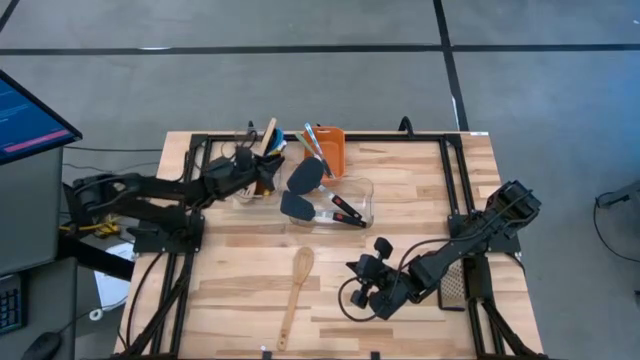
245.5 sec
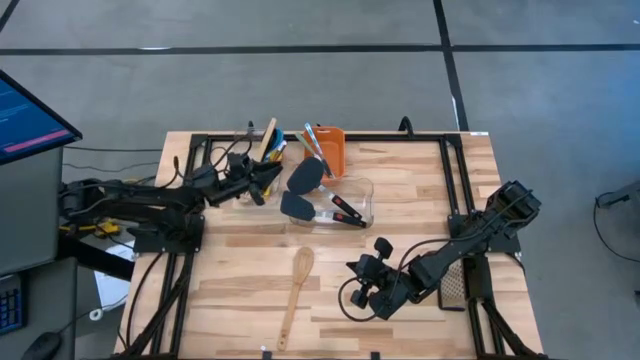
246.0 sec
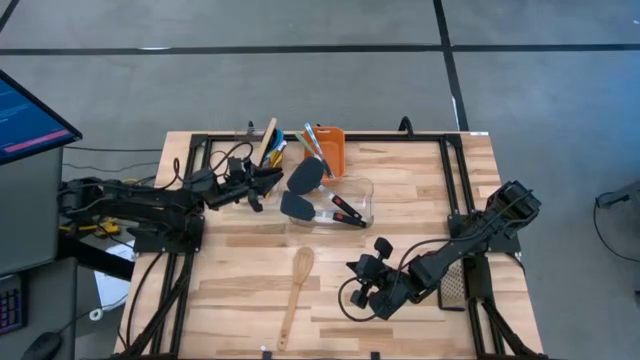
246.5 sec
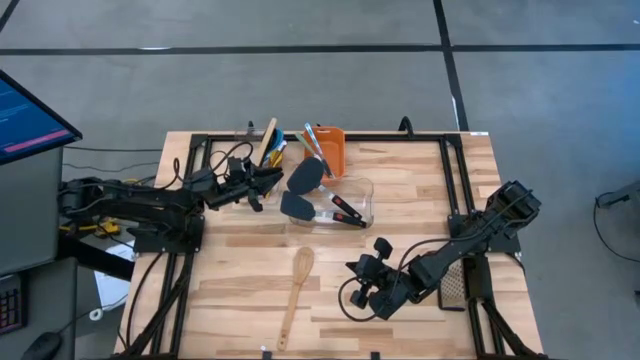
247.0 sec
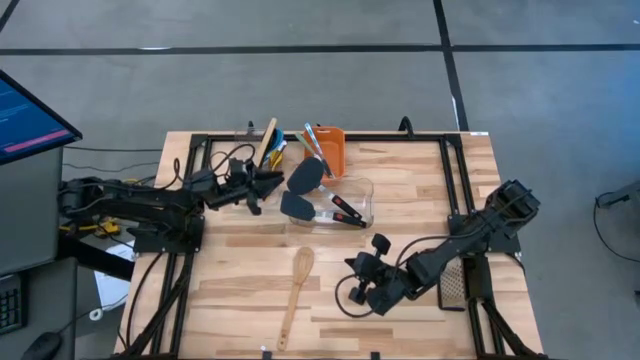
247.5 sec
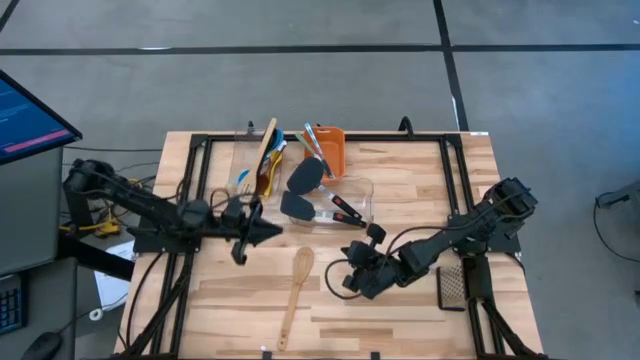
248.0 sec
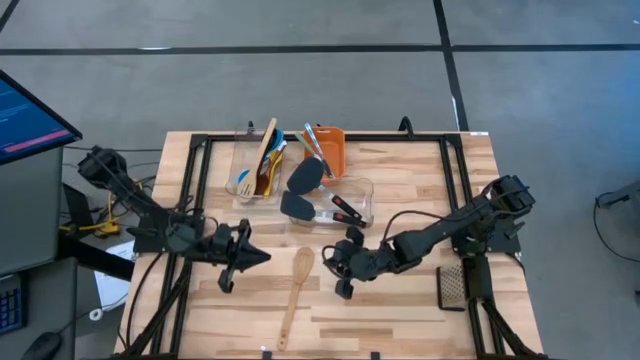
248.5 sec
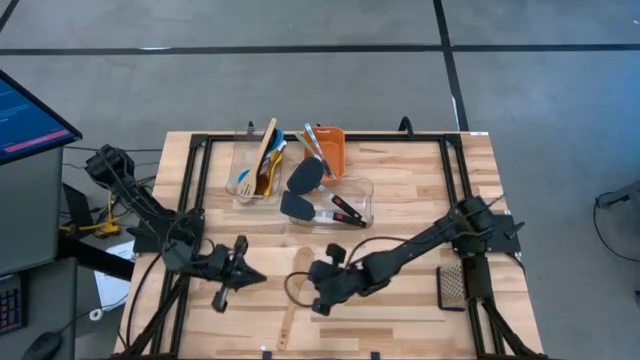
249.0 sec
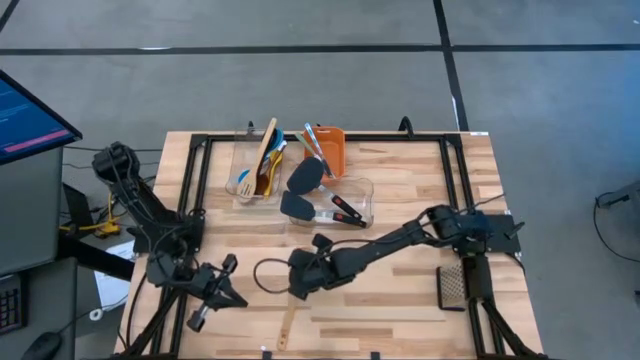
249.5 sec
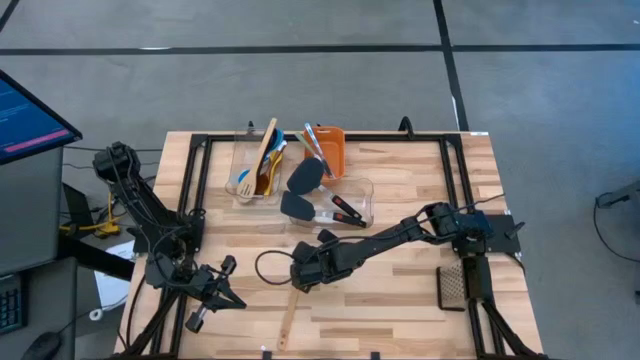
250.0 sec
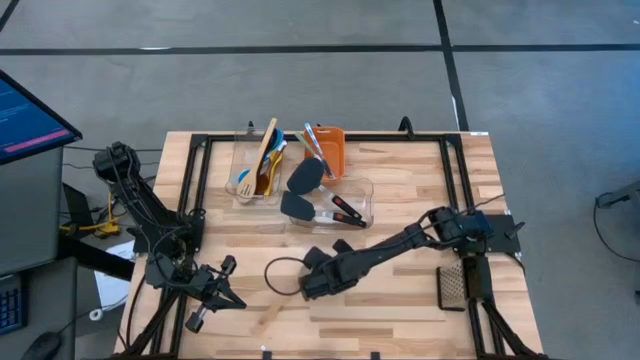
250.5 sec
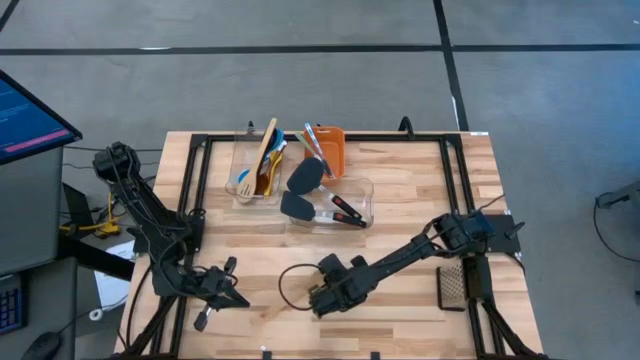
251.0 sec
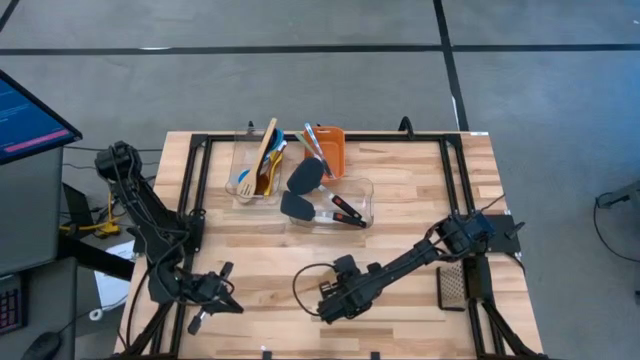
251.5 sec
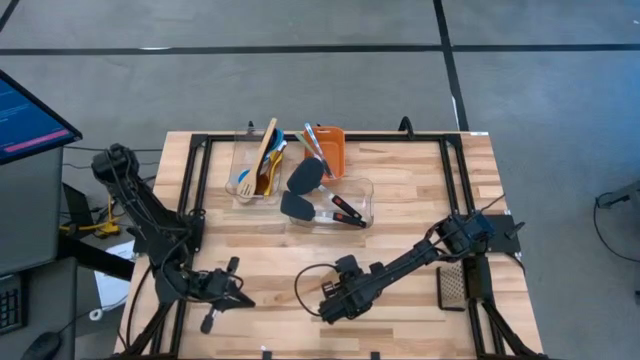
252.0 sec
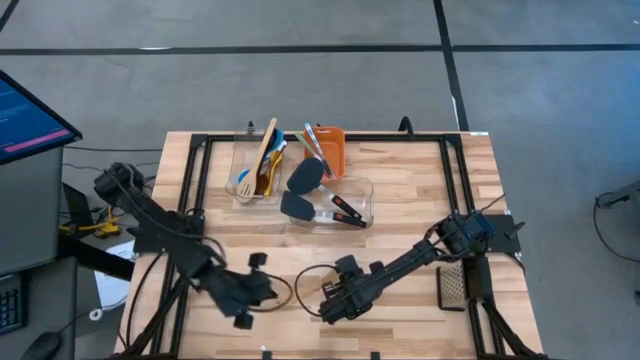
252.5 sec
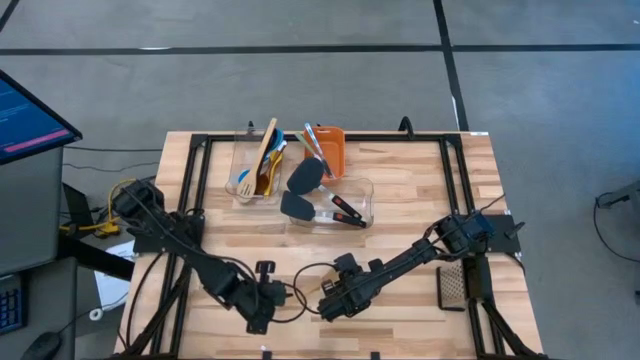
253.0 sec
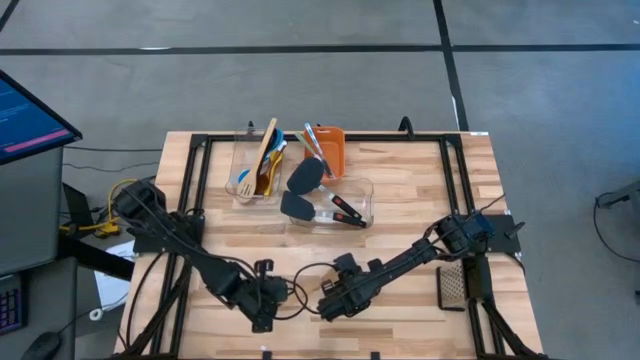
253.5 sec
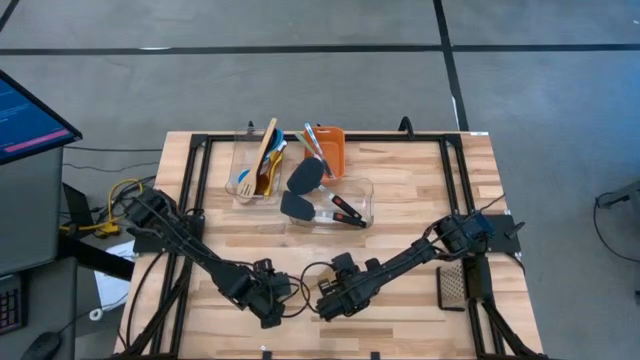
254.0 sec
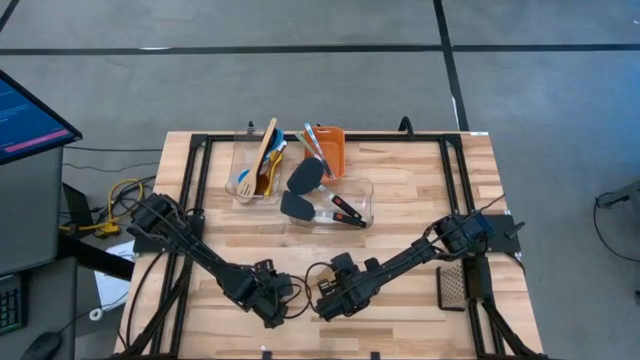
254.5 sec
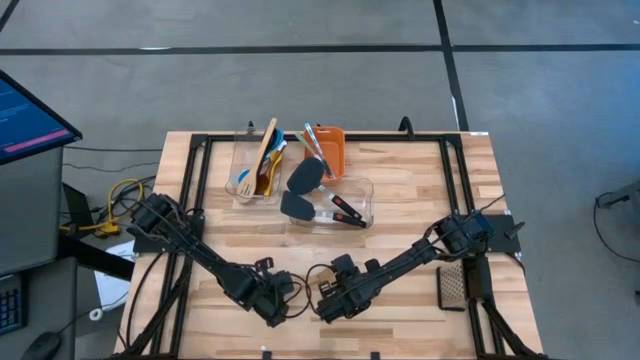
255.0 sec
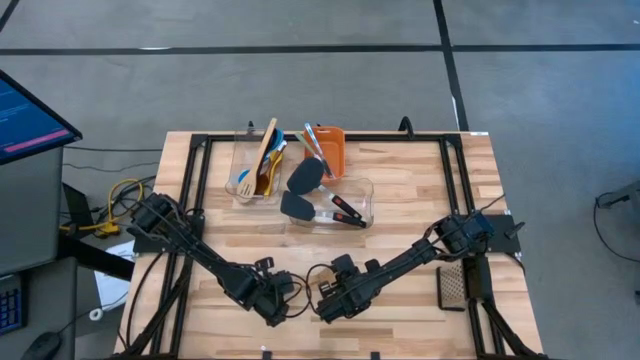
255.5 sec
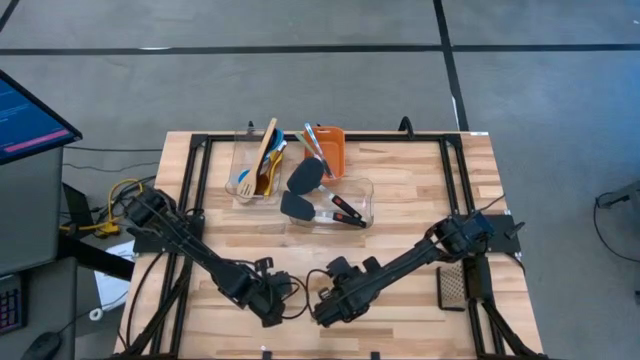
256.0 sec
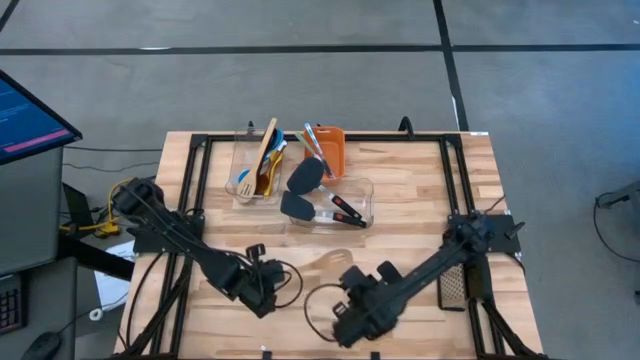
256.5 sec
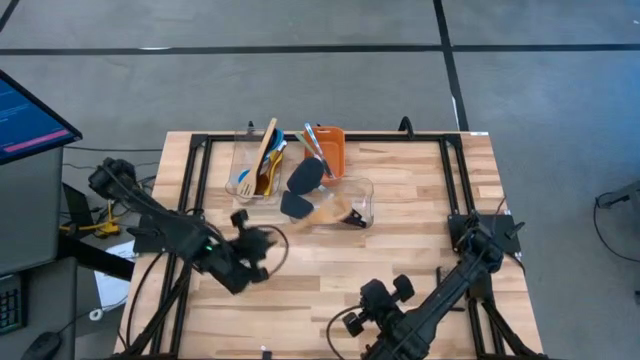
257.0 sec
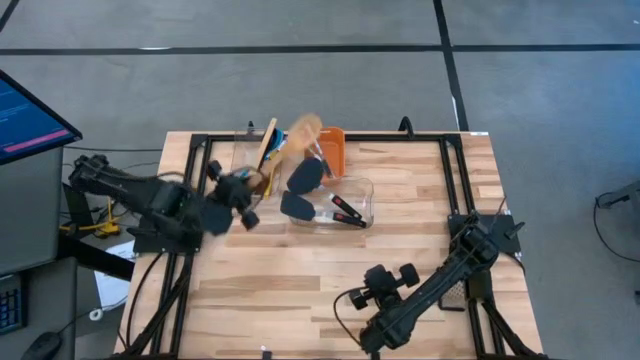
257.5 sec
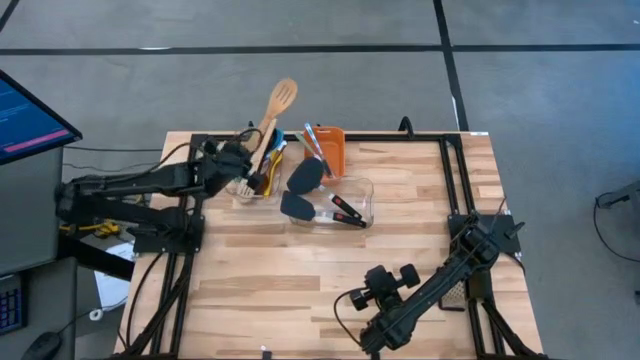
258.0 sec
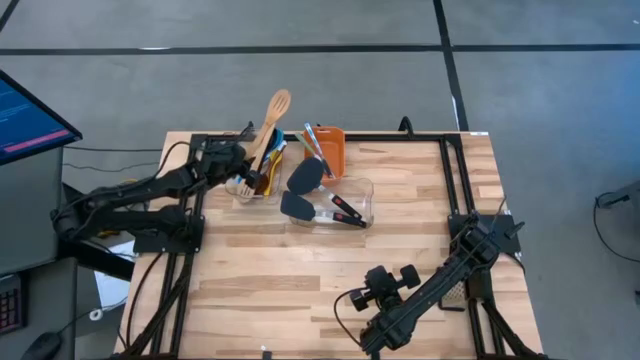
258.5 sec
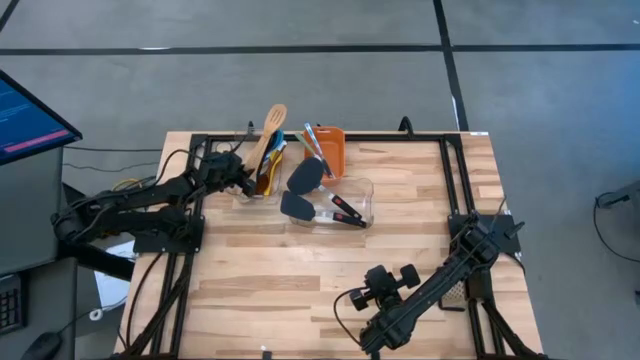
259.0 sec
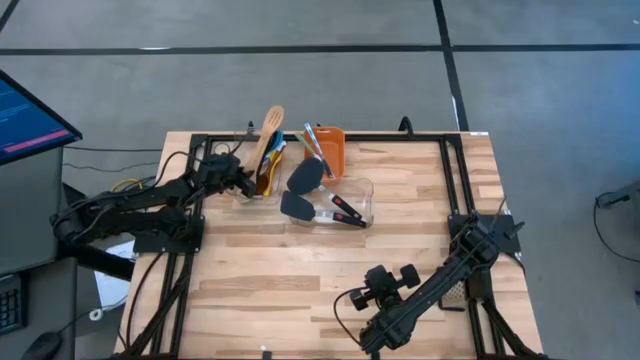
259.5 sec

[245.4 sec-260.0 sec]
Task: Pick & Place Kitchen Items
Put the light brown wooden slotted spatula into the top transparent bin

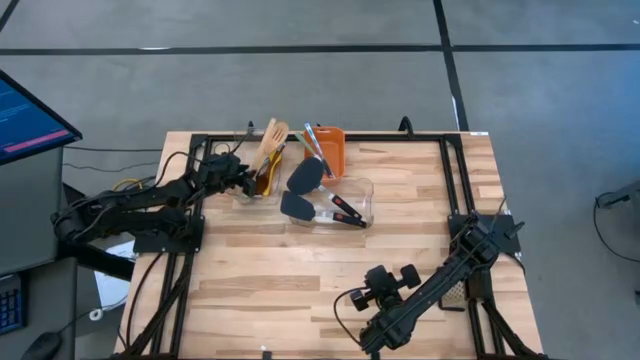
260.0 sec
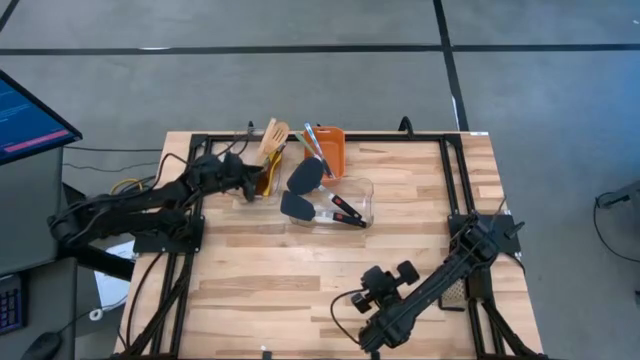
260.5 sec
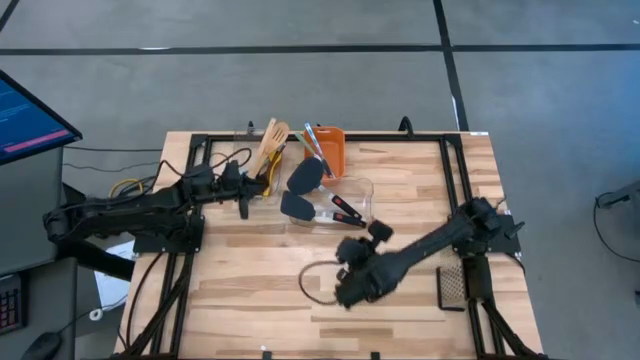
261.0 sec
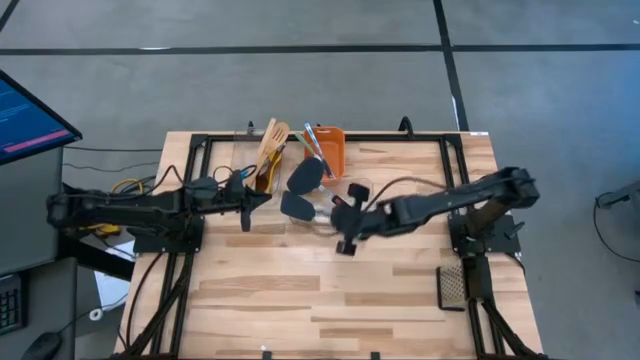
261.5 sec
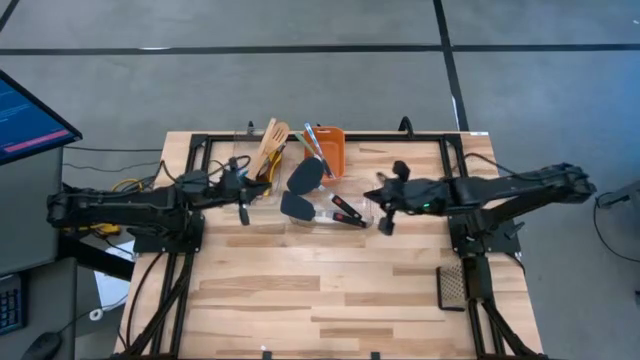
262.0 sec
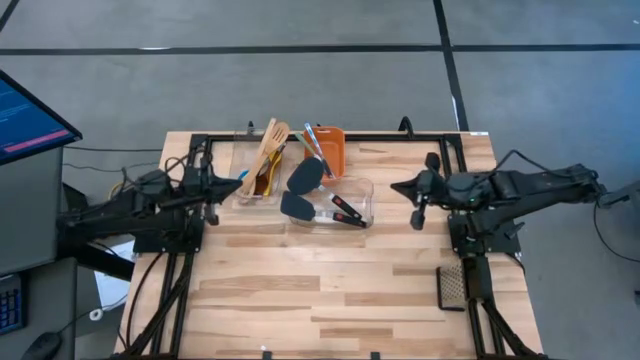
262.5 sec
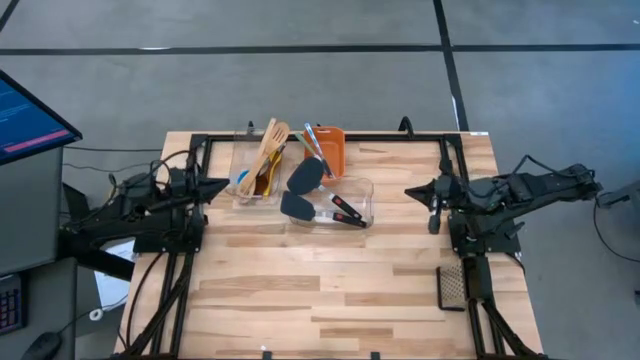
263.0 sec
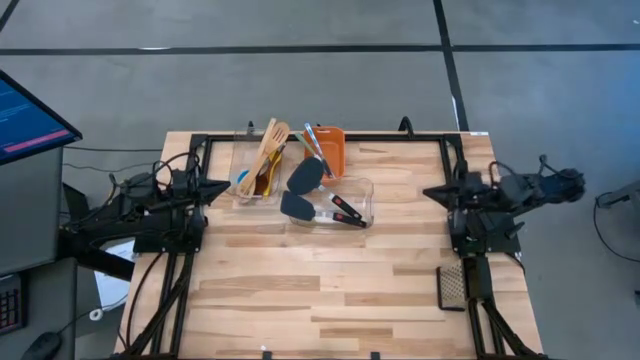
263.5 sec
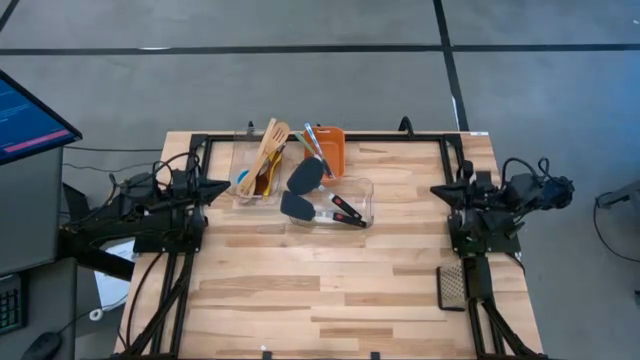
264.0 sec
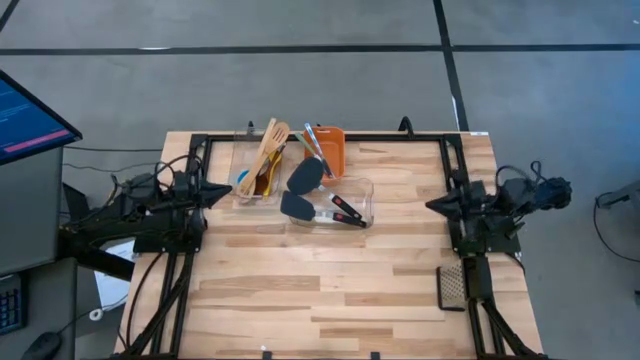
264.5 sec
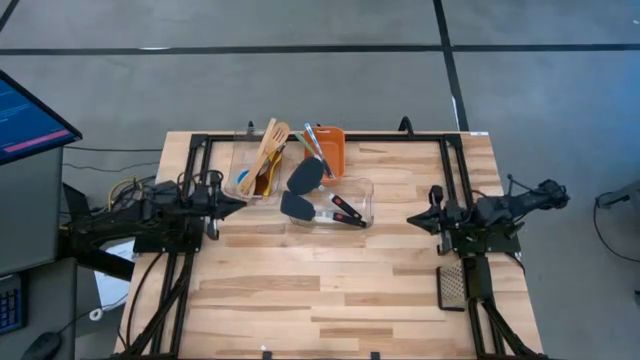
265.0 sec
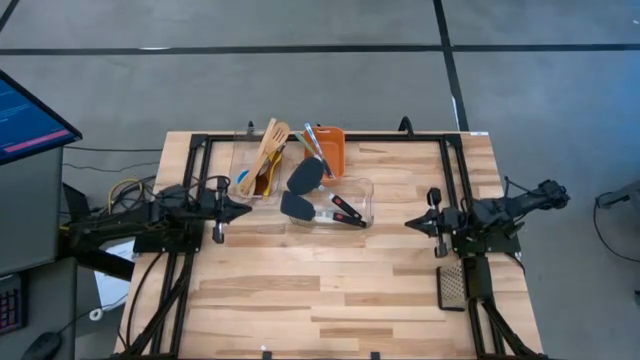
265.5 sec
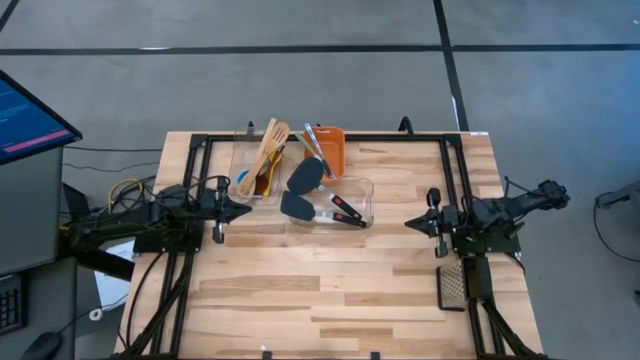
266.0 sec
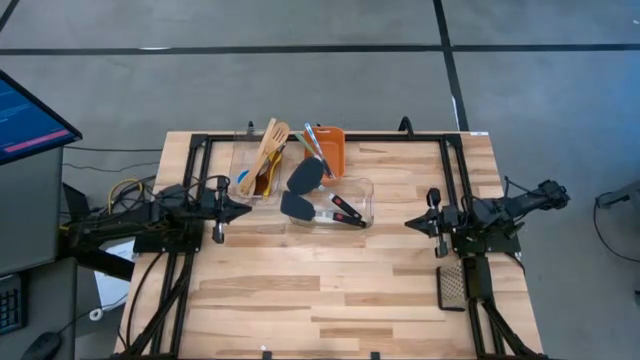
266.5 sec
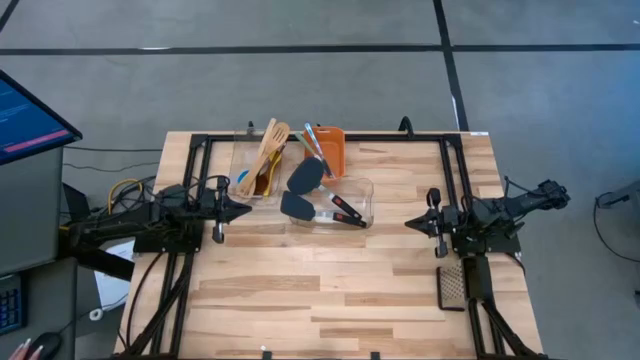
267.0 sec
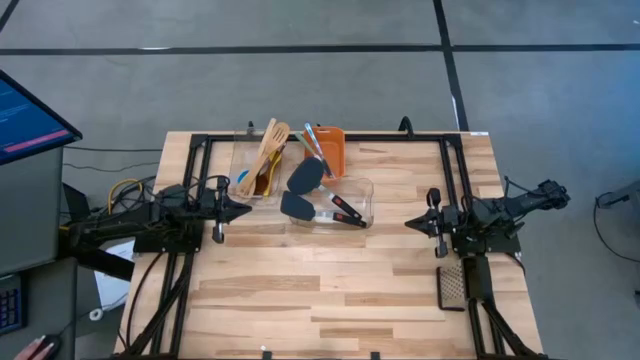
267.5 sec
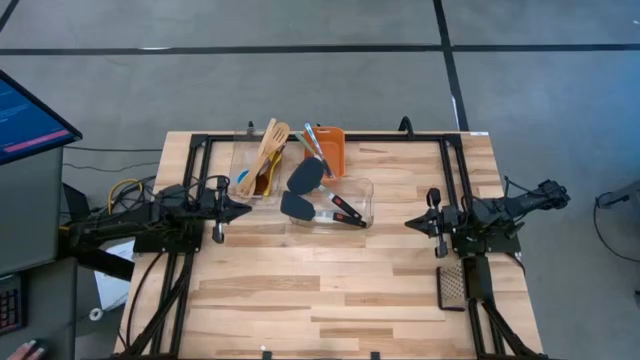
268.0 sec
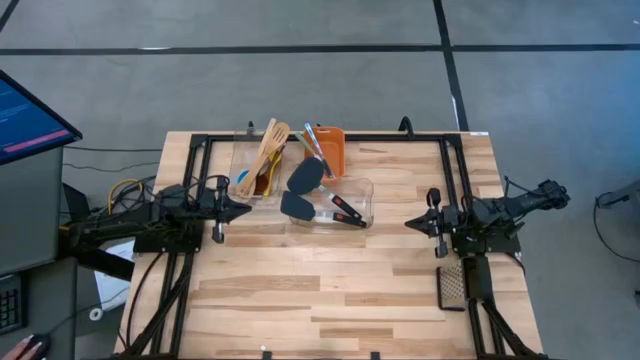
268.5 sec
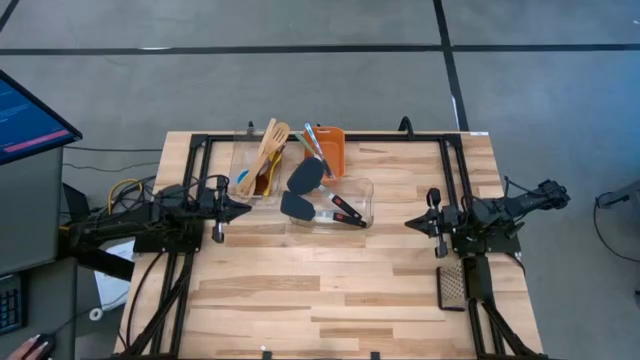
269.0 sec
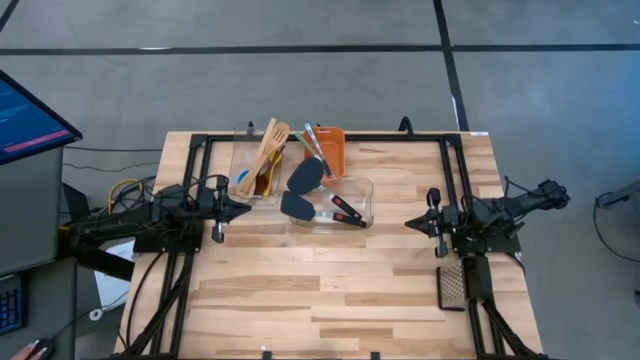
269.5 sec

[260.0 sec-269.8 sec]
Return to Home Position
